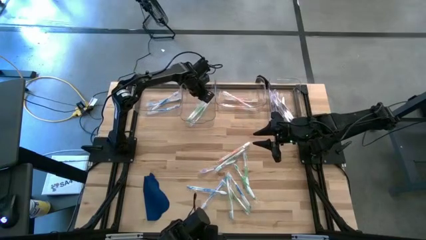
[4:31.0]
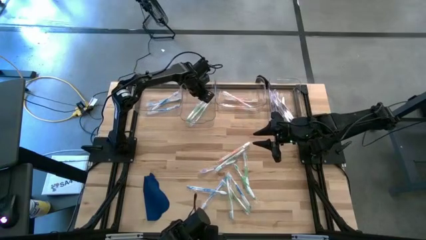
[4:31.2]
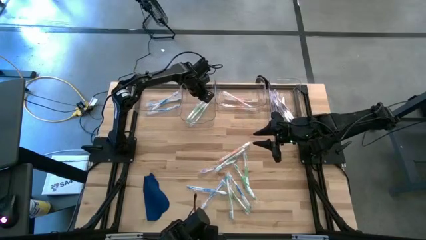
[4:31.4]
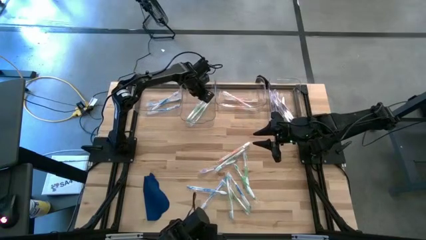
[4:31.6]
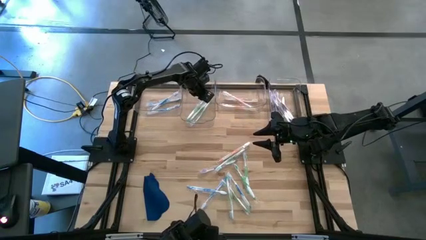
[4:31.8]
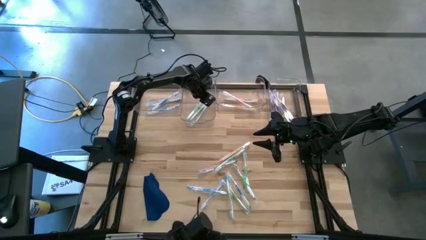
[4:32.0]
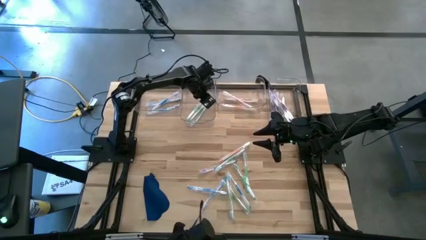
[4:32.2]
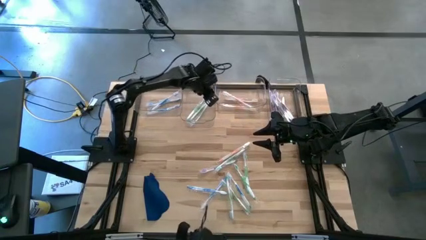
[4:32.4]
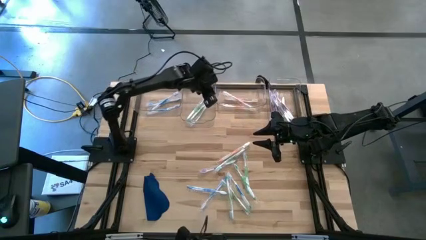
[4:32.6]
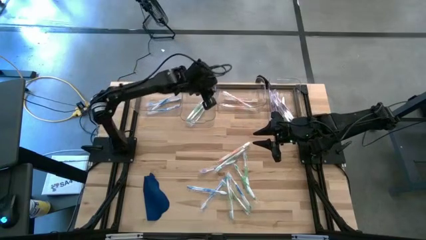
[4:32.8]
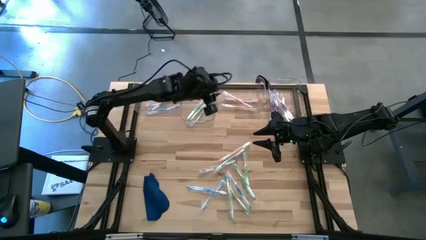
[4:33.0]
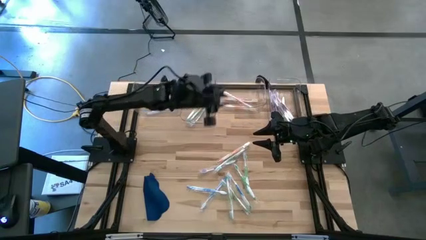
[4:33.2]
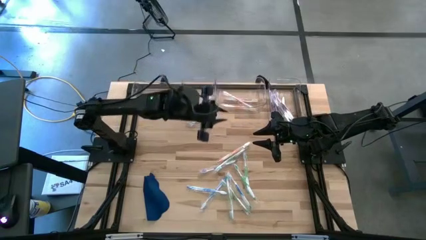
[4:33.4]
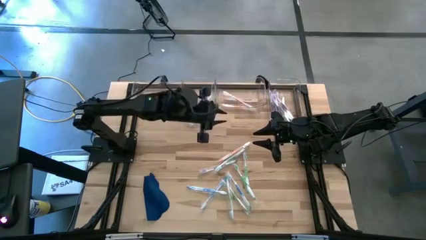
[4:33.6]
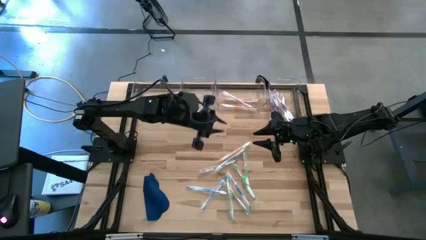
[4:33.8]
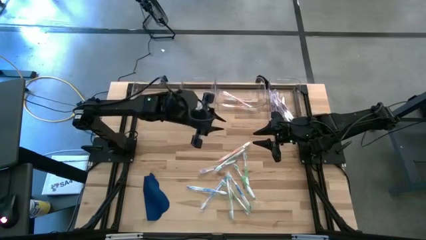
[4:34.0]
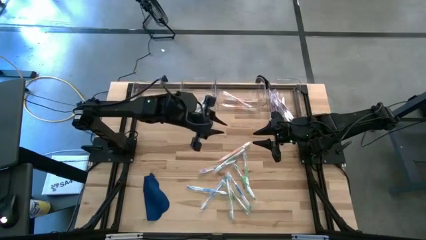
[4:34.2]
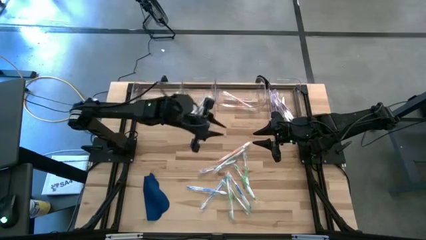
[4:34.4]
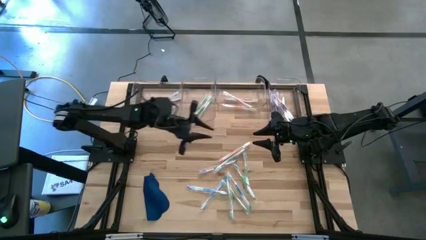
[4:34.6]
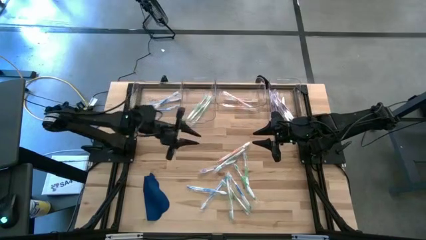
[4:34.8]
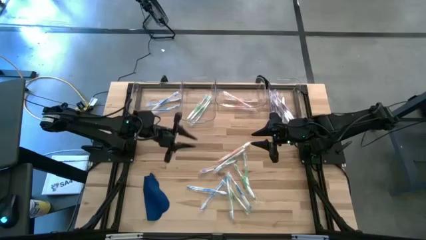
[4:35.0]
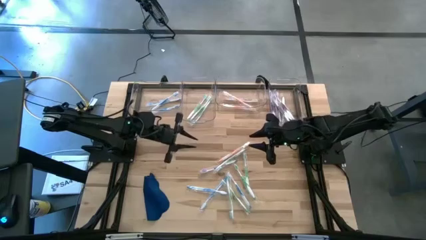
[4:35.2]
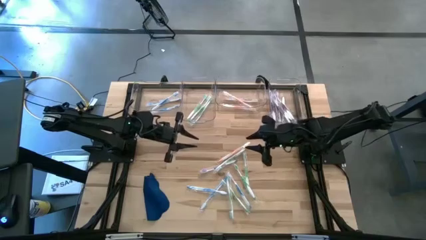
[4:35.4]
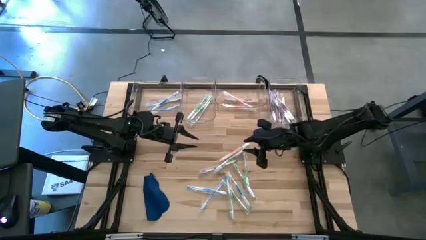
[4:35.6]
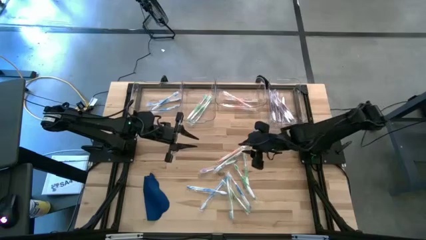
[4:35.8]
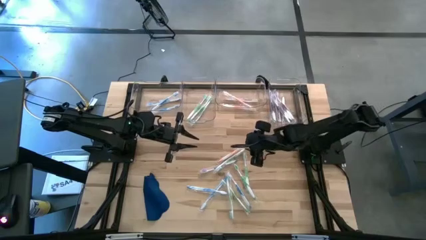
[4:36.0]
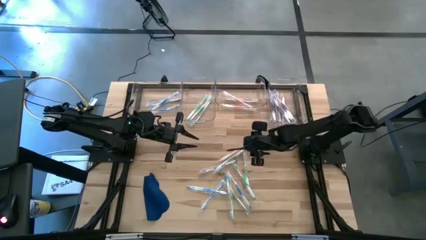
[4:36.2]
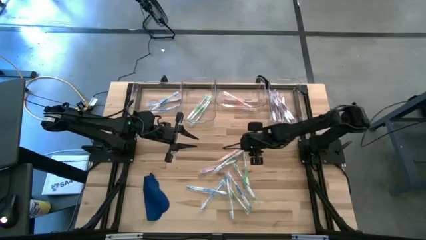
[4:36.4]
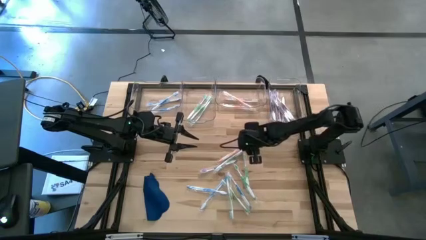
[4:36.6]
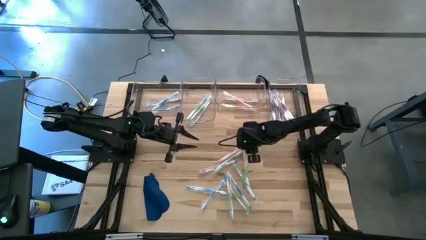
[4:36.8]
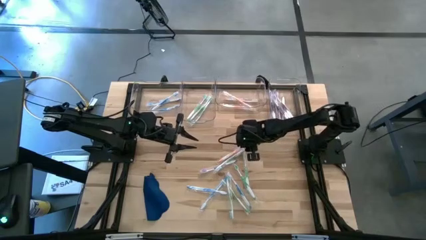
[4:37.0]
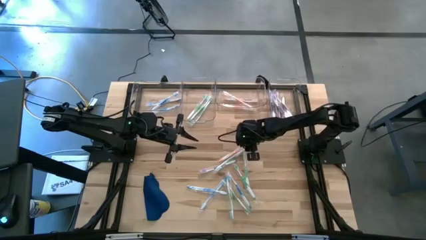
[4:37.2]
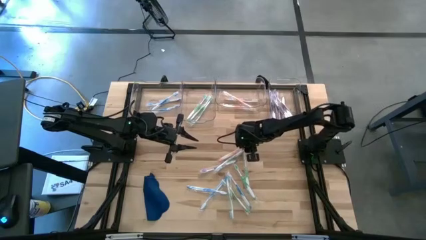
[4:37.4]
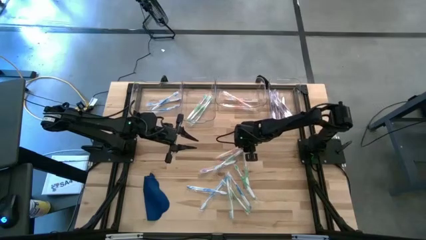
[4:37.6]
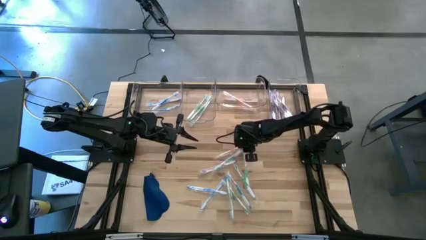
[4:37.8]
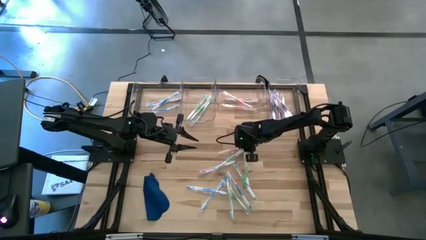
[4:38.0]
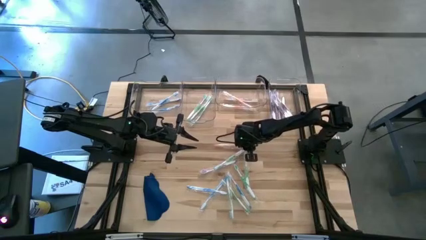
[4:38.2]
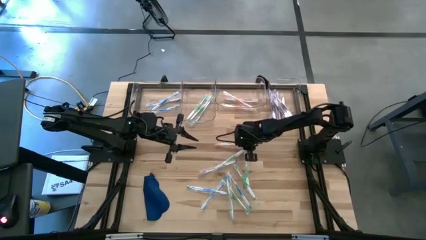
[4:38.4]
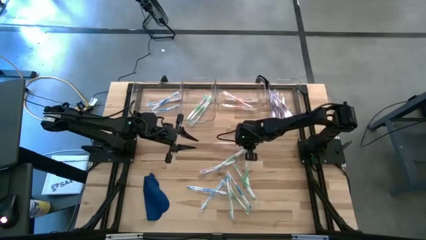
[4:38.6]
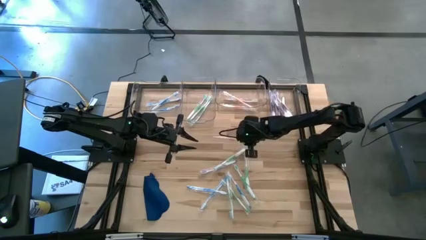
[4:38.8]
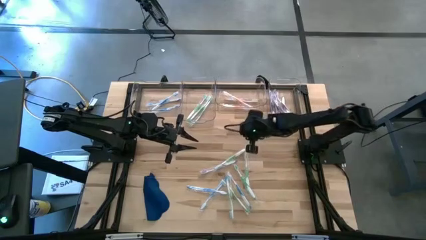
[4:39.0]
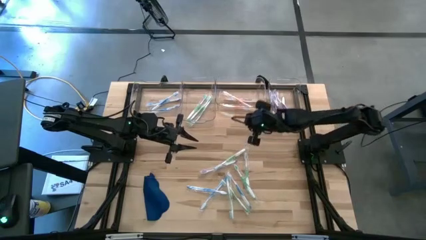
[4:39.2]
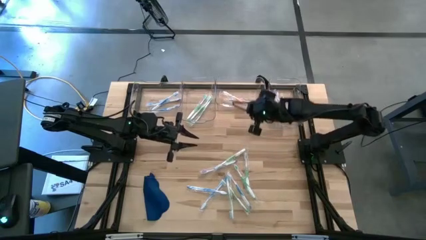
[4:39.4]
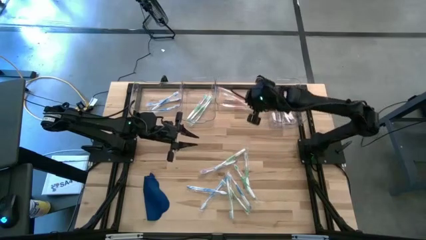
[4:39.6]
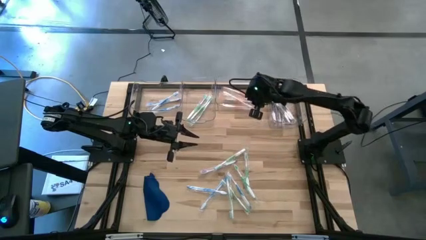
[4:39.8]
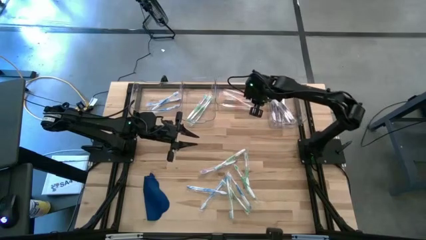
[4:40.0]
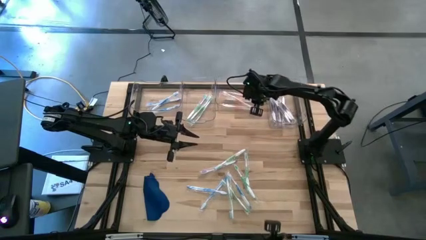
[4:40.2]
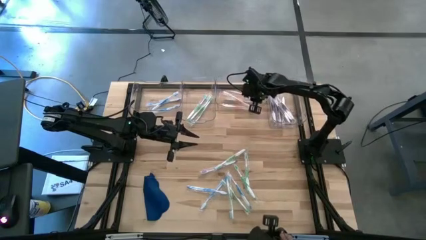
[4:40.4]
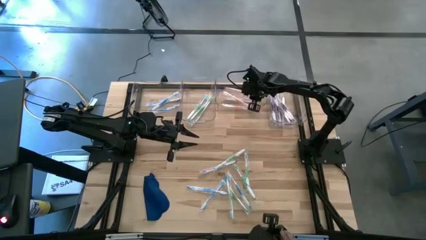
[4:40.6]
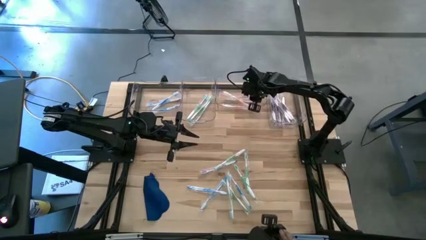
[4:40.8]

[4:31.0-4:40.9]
Task: Pick & Place Toothbrushes
Put the orange toothbrush into the middle right transparent bin

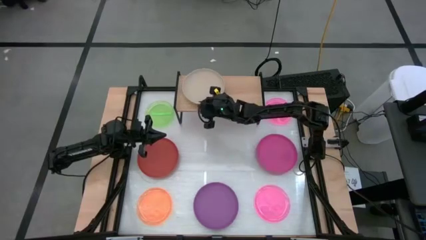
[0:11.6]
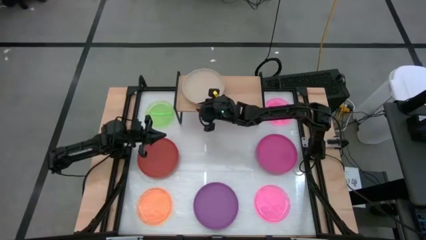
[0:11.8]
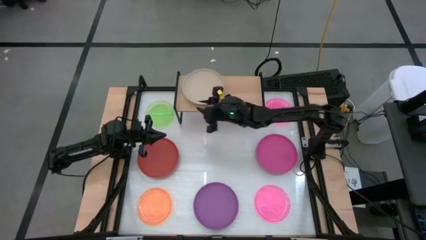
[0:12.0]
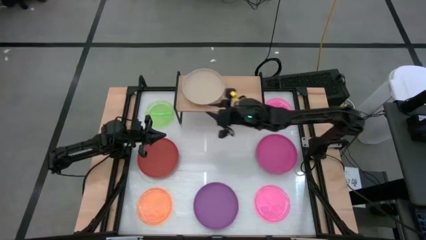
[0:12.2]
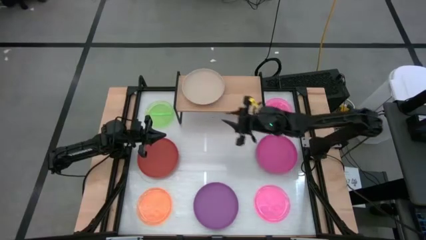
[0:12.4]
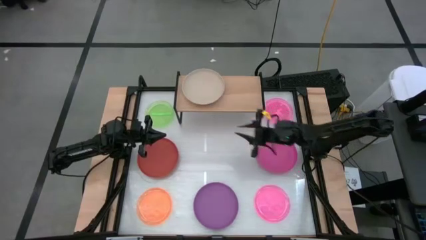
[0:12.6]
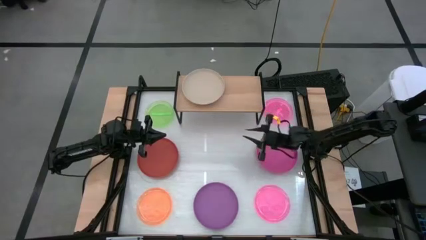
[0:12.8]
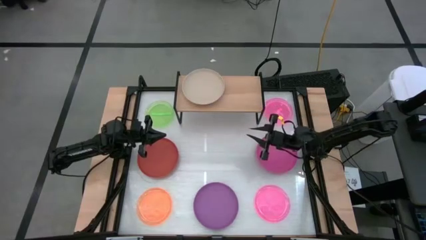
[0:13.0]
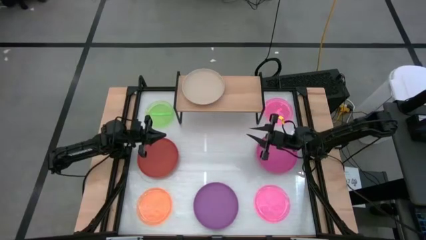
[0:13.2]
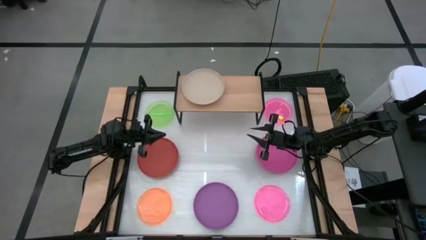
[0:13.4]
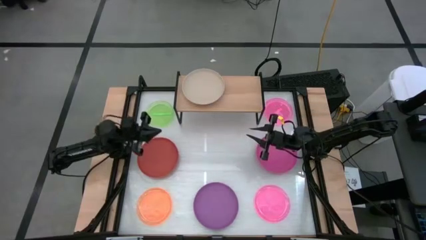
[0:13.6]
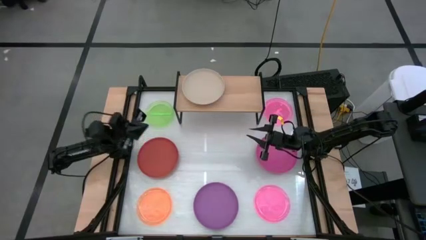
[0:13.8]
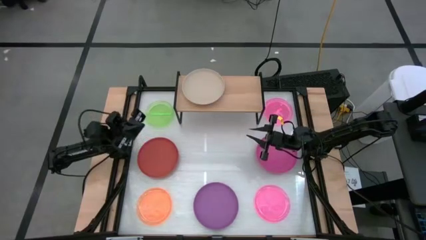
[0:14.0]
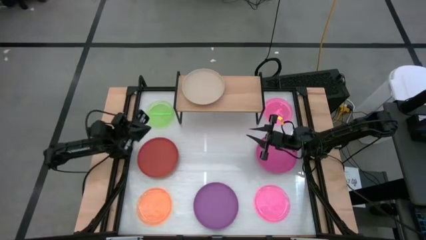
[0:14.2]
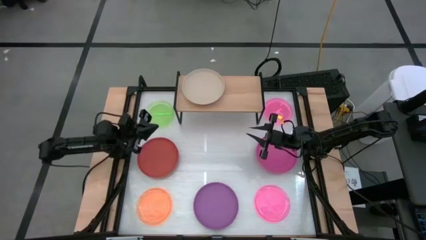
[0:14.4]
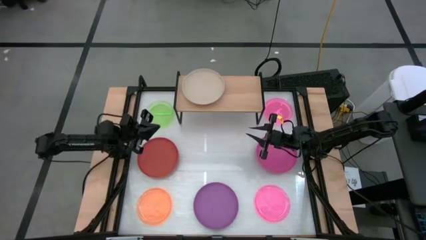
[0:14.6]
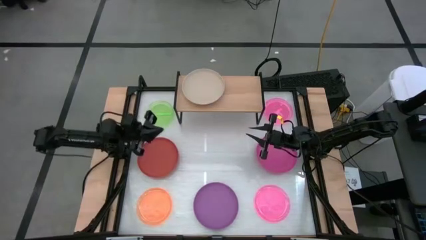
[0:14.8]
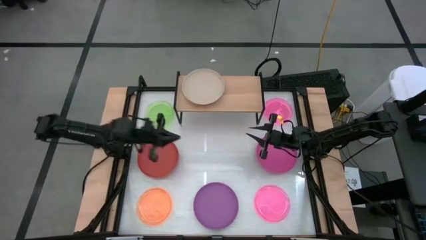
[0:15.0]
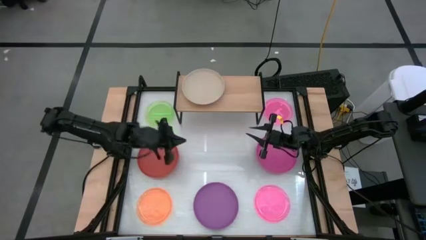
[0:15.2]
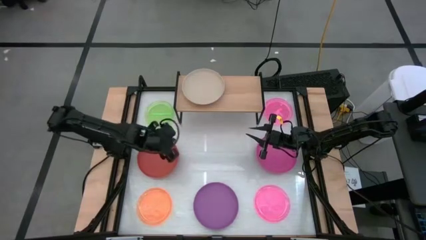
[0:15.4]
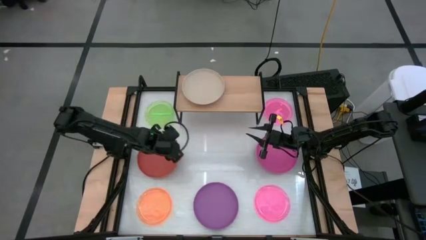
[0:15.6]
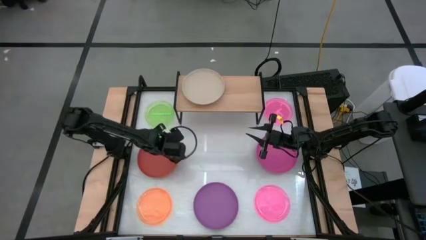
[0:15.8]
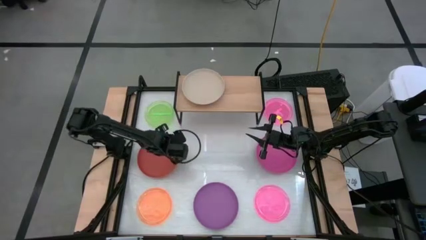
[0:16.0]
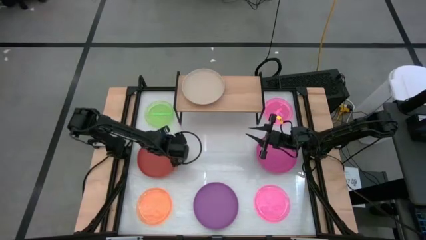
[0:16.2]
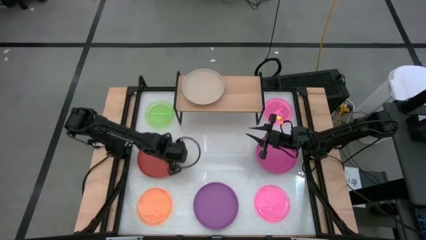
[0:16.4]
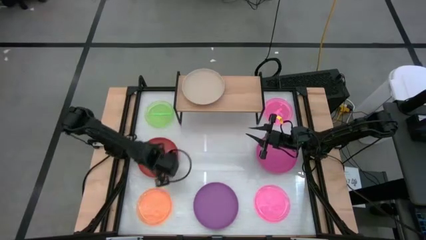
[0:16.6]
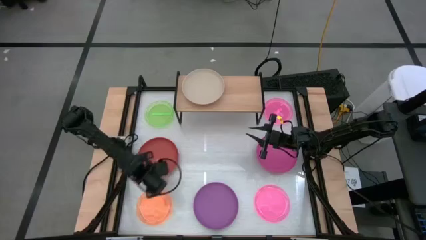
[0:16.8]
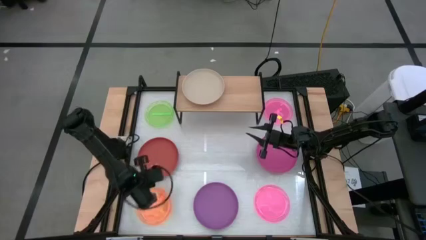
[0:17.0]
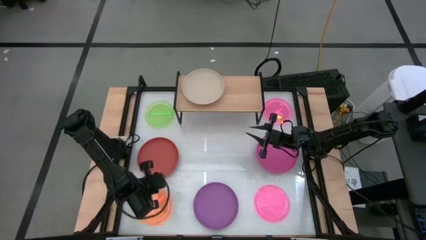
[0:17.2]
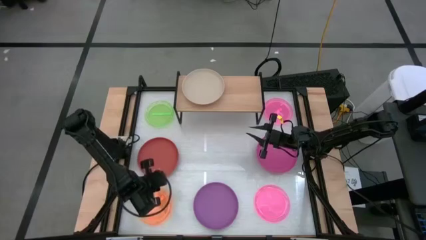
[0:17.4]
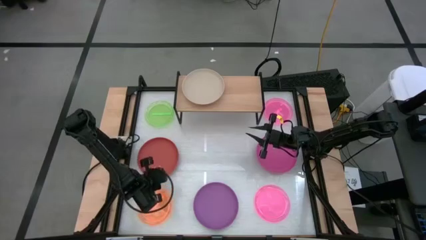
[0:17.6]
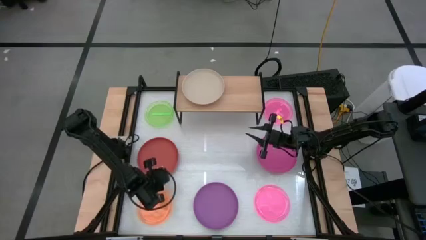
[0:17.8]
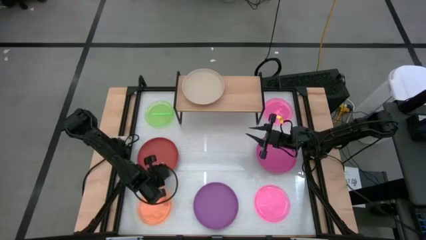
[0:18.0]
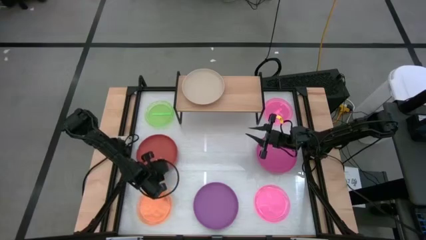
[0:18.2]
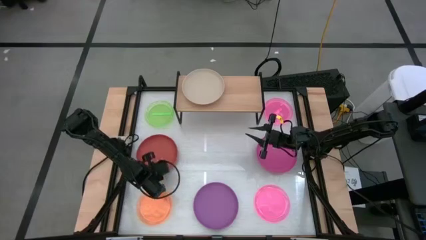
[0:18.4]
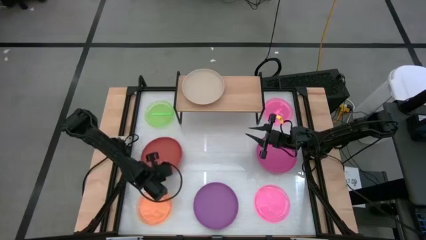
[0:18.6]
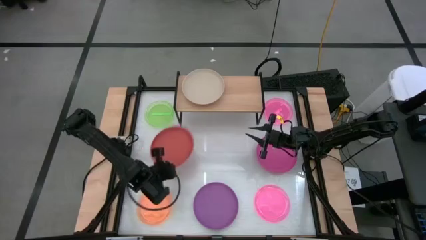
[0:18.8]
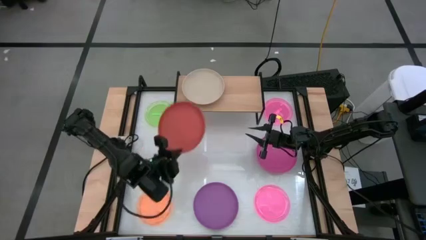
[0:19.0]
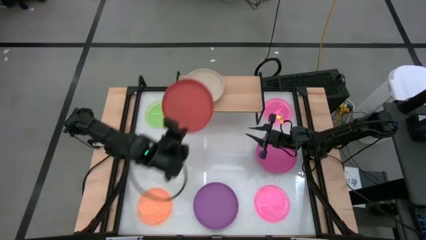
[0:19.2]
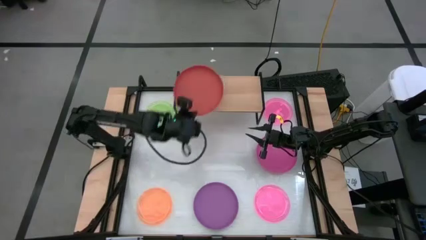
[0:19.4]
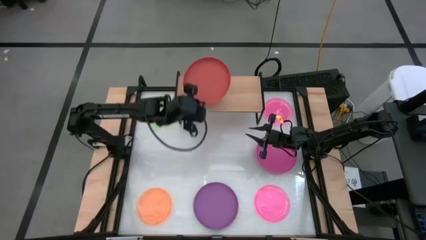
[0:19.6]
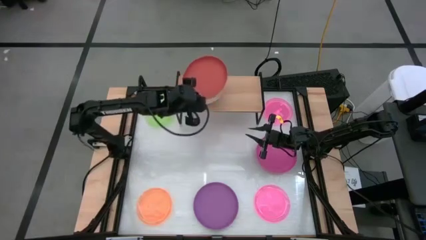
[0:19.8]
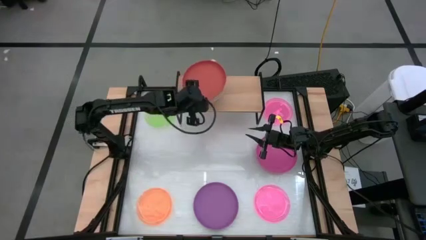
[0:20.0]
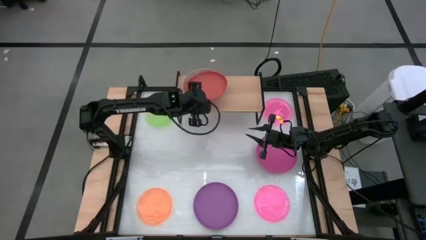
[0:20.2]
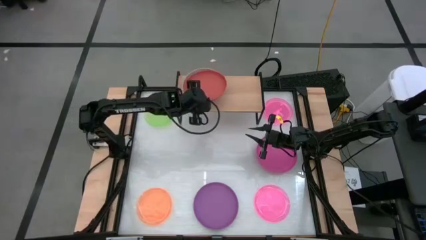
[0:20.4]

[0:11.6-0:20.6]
Task: Place and stack plates onto a shelf
Stack the orange plate on top of the gray plate on the shelf
